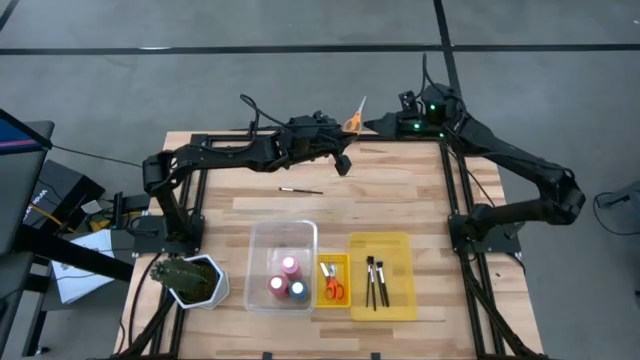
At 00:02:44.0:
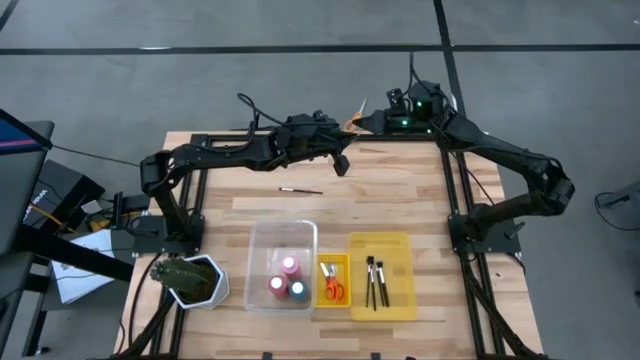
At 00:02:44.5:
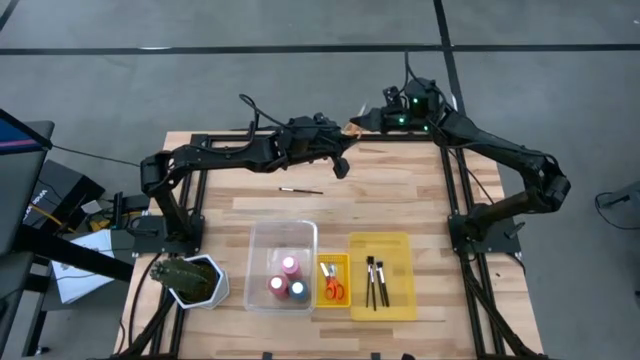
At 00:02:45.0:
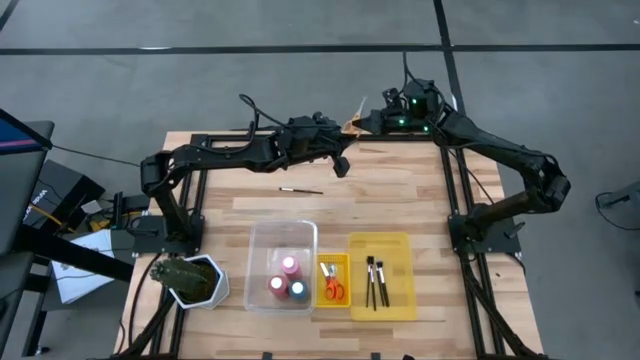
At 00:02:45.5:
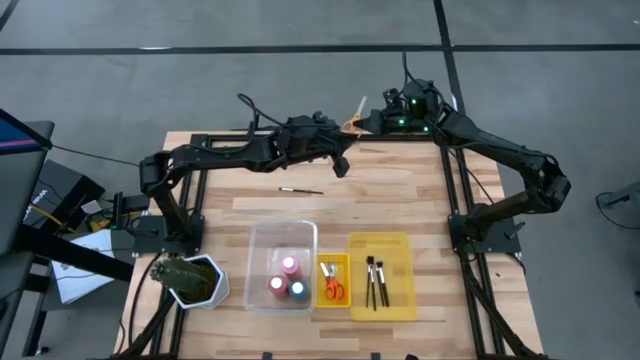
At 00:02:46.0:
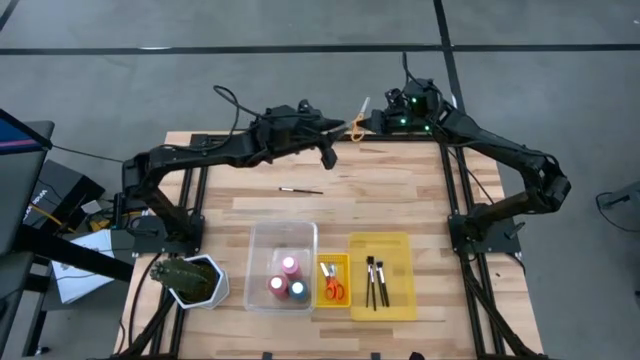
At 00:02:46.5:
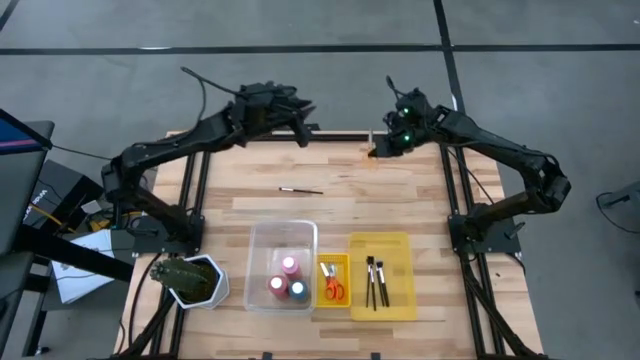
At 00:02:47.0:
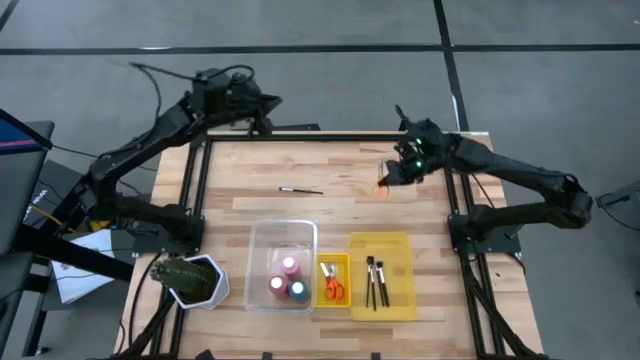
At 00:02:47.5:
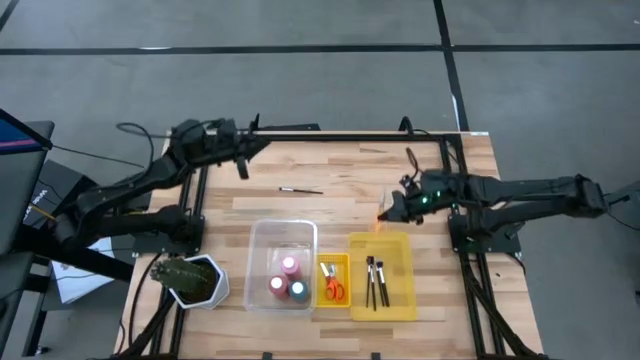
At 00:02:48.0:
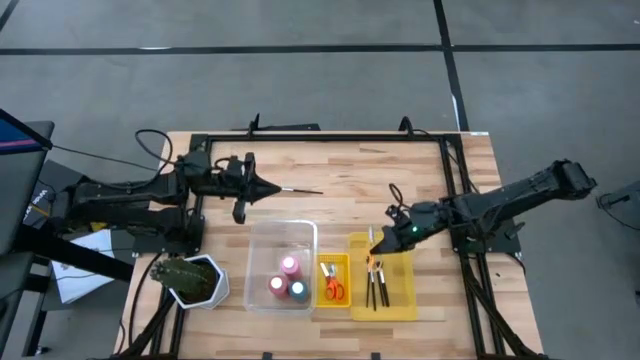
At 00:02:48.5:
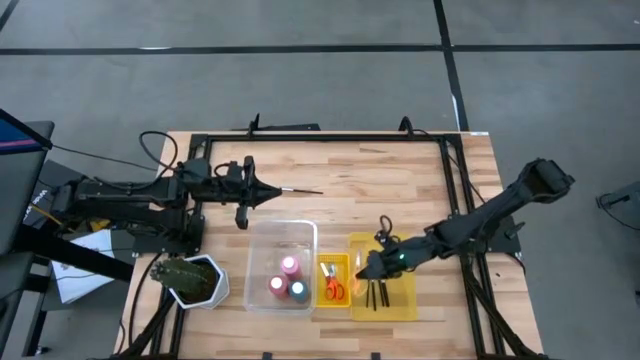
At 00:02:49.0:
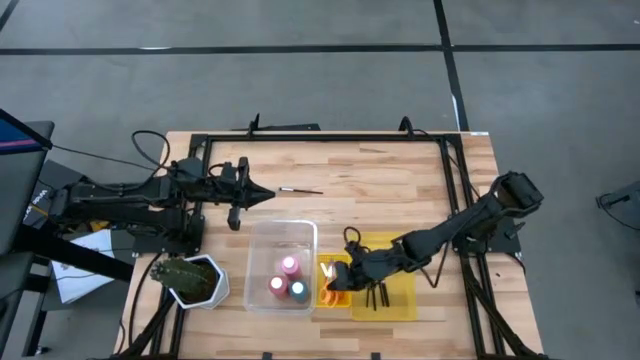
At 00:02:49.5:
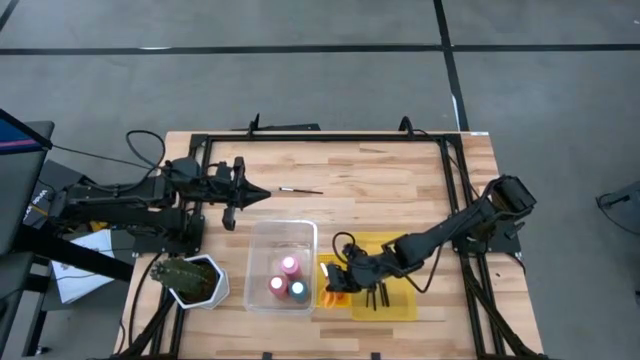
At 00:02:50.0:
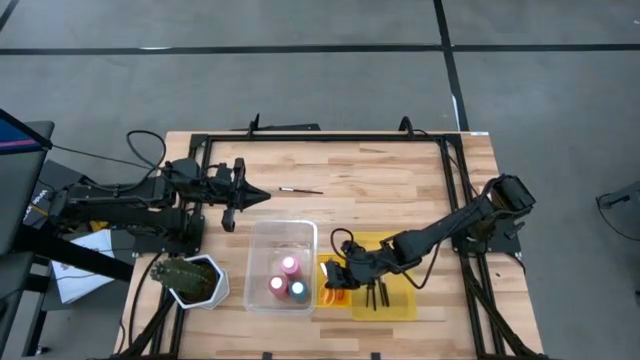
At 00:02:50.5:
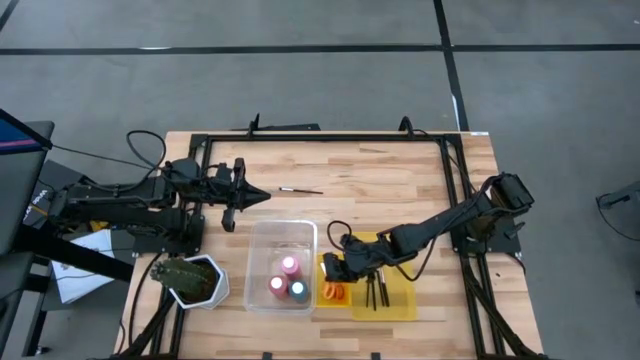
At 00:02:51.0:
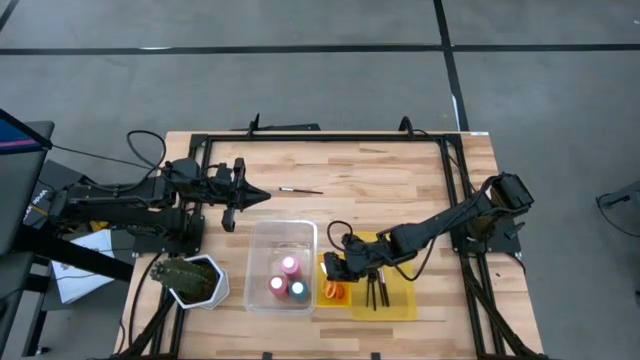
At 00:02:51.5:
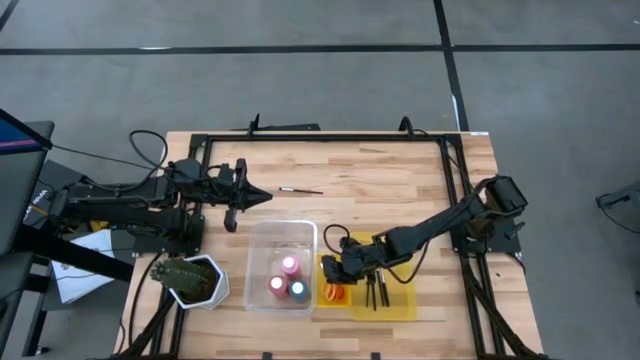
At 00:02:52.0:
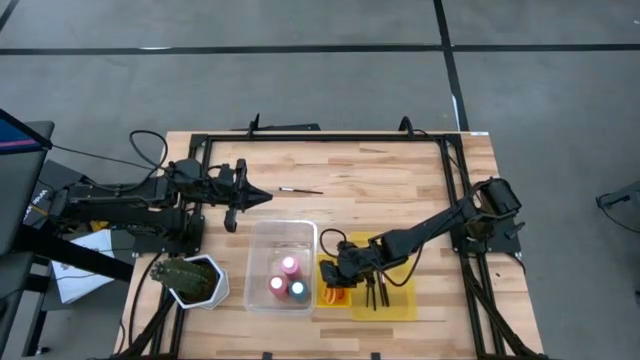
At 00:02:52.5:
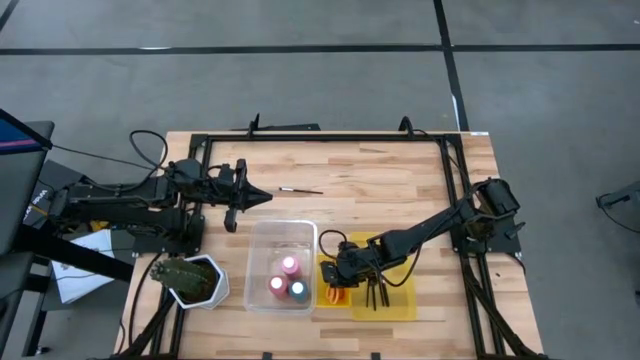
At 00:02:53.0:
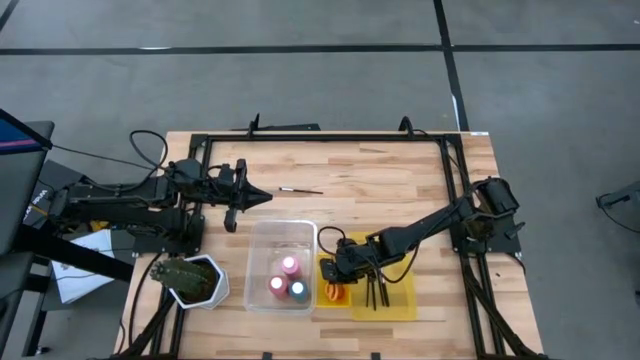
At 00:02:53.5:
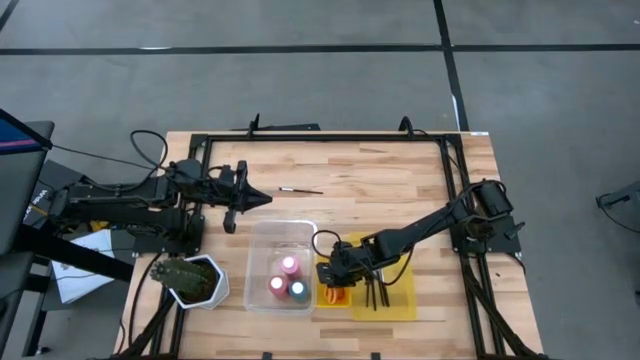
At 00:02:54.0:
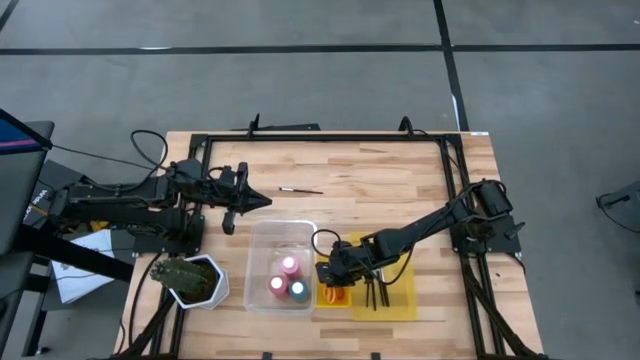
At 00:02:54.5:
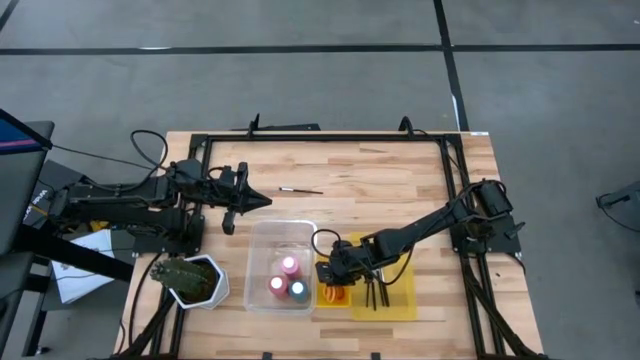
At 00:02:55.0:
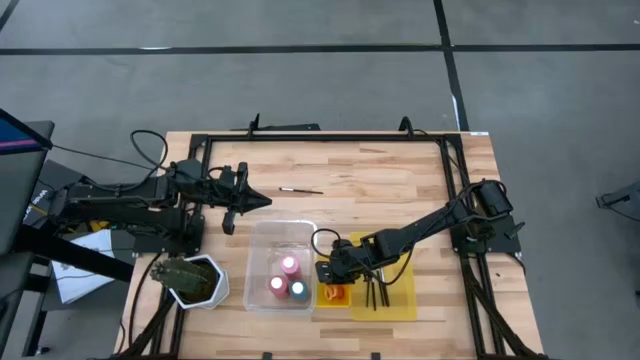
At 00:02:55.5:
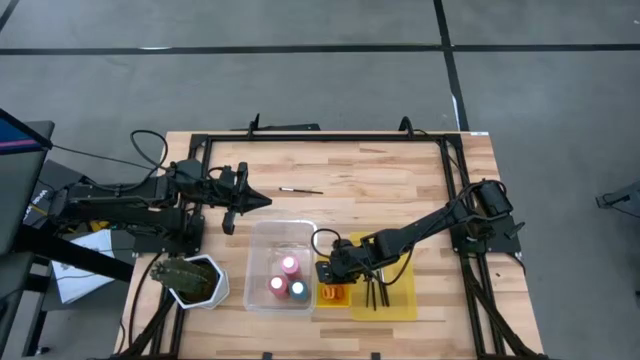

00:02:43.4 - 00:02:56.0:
Task: Pick & Place Paint Supplies
Put the yellow scissors into the left yellow bin
